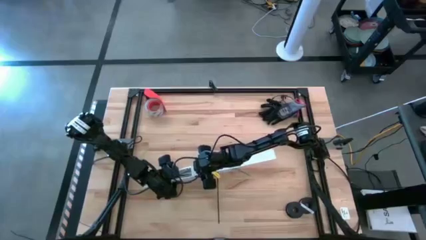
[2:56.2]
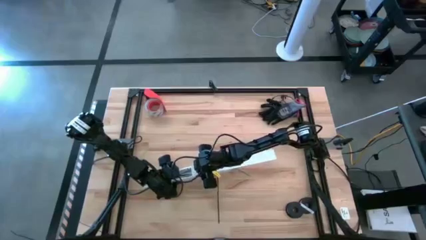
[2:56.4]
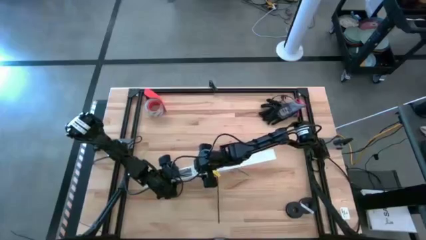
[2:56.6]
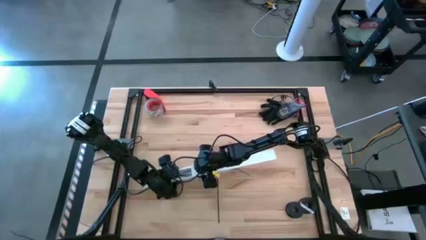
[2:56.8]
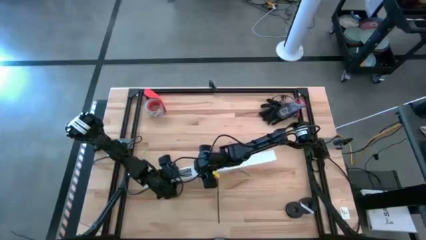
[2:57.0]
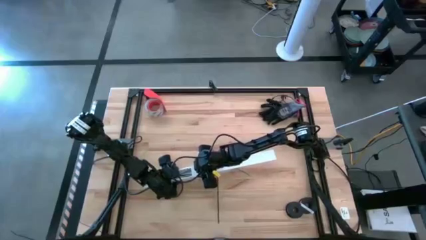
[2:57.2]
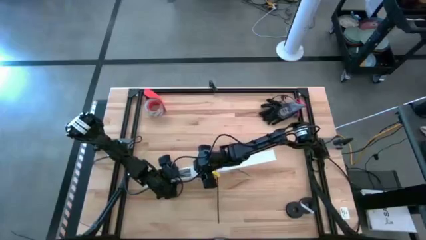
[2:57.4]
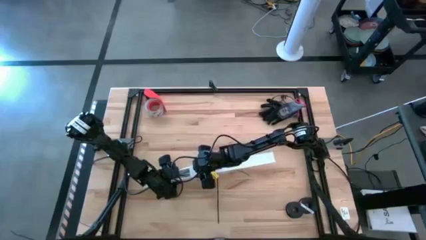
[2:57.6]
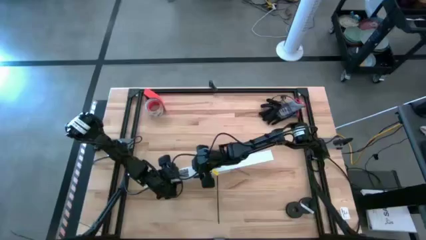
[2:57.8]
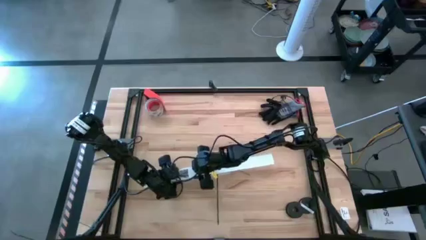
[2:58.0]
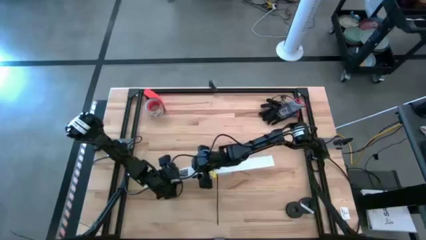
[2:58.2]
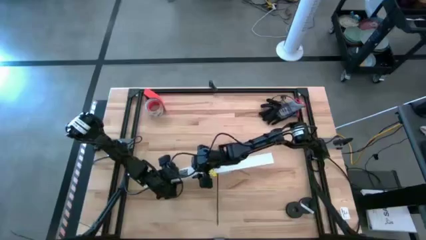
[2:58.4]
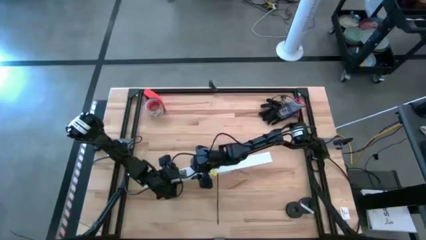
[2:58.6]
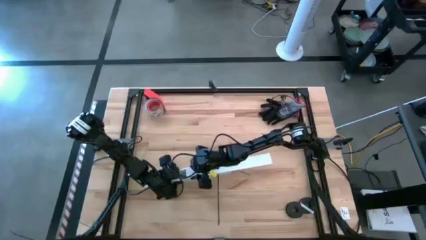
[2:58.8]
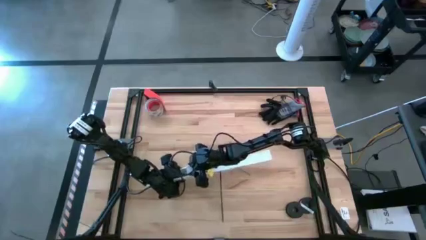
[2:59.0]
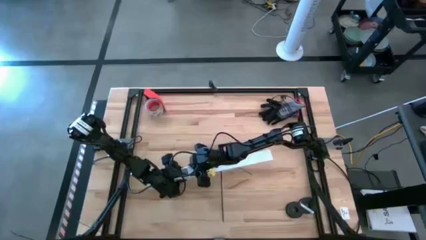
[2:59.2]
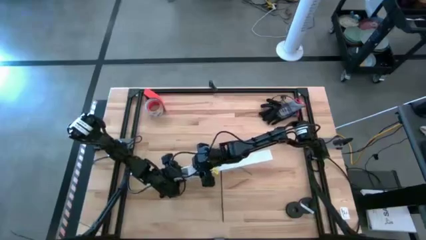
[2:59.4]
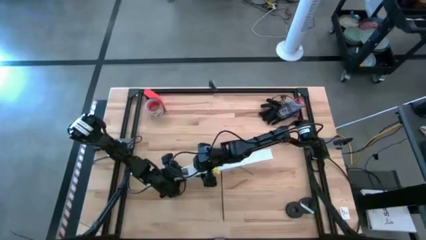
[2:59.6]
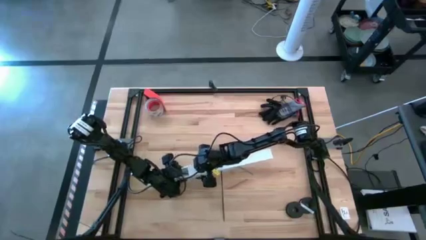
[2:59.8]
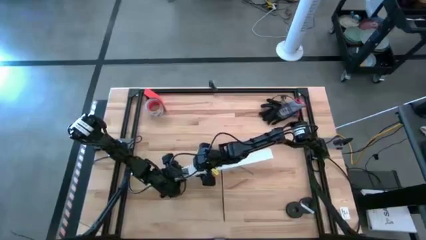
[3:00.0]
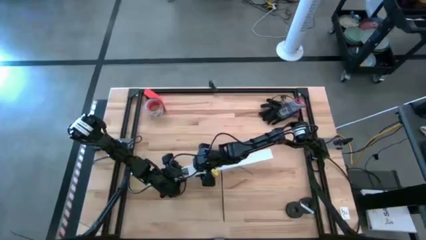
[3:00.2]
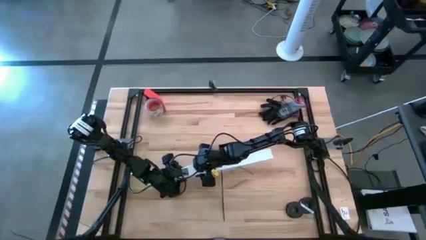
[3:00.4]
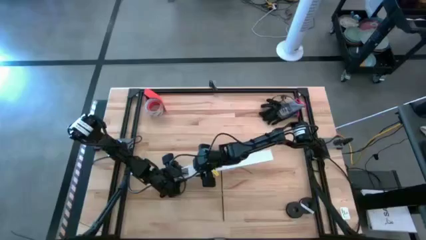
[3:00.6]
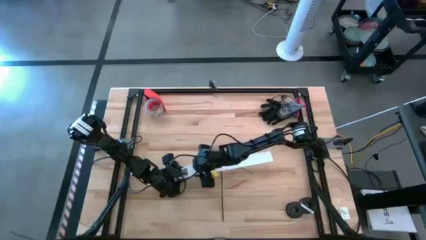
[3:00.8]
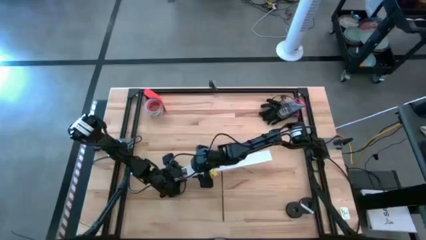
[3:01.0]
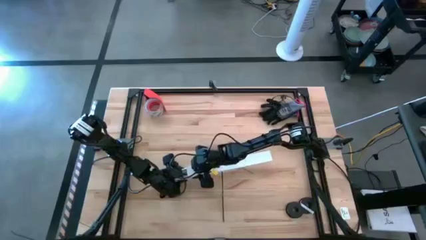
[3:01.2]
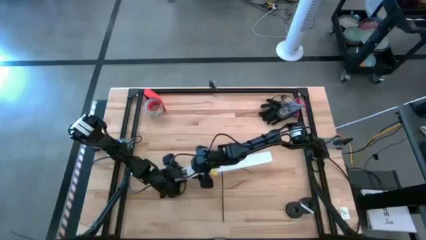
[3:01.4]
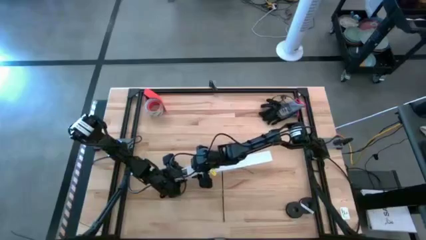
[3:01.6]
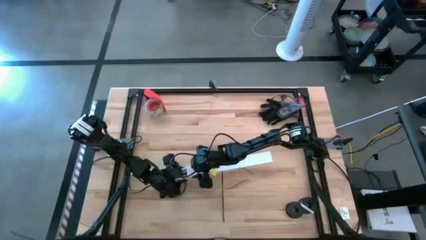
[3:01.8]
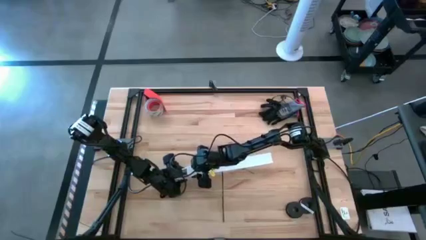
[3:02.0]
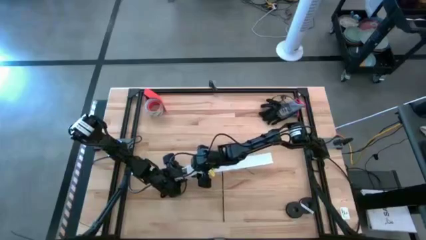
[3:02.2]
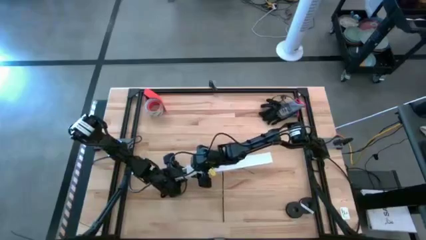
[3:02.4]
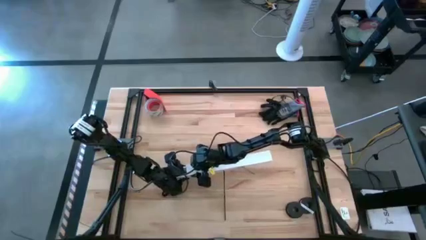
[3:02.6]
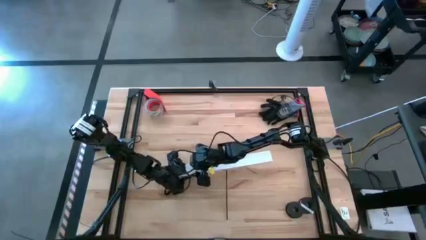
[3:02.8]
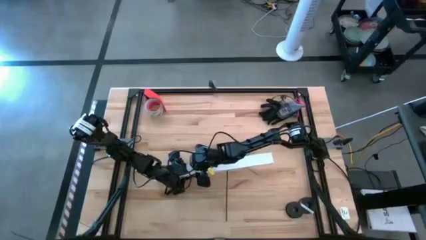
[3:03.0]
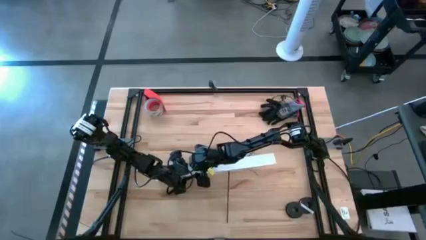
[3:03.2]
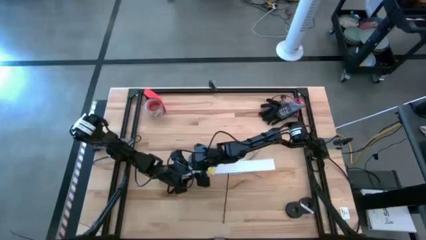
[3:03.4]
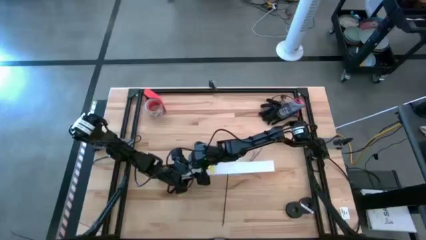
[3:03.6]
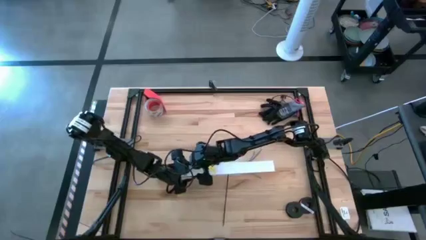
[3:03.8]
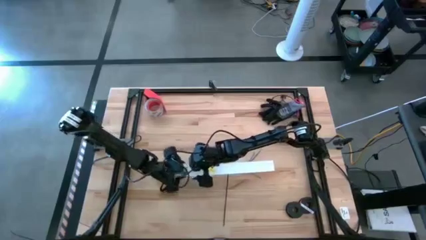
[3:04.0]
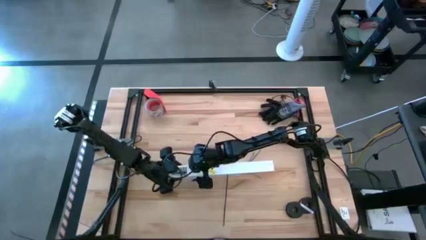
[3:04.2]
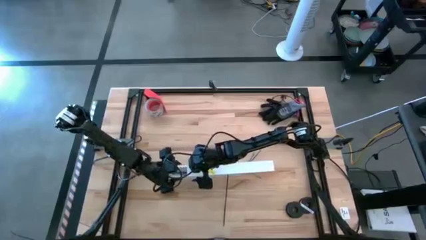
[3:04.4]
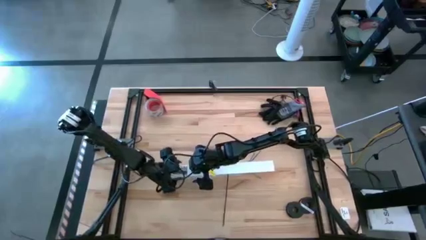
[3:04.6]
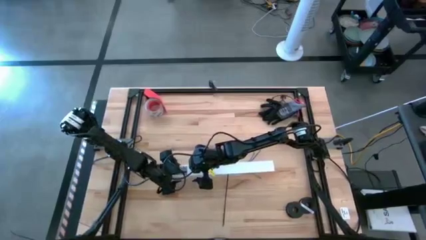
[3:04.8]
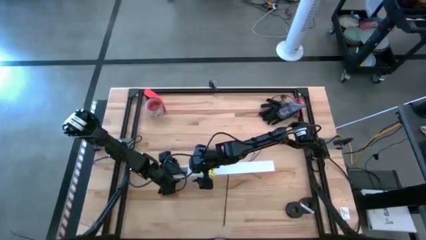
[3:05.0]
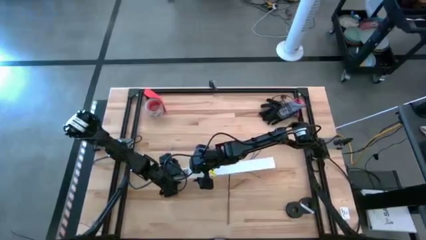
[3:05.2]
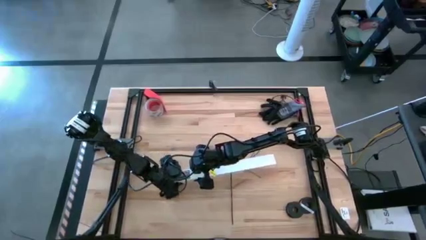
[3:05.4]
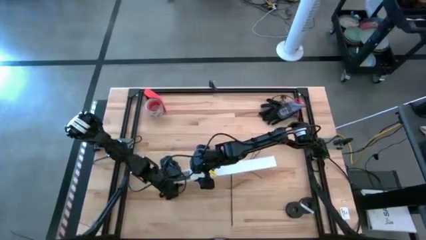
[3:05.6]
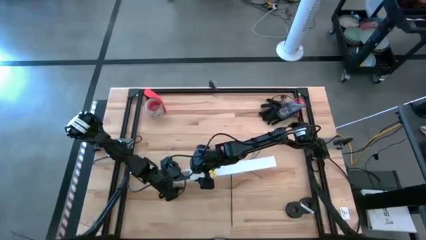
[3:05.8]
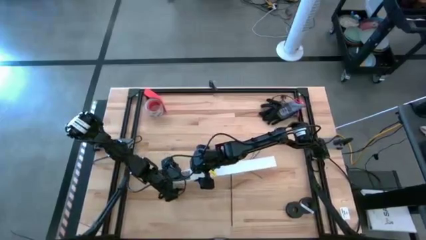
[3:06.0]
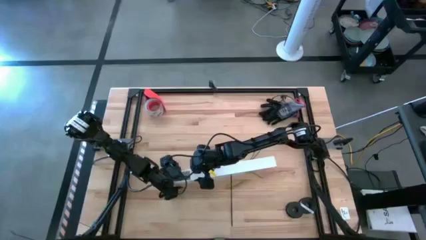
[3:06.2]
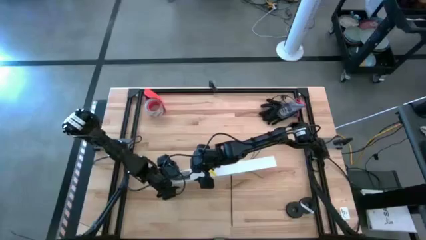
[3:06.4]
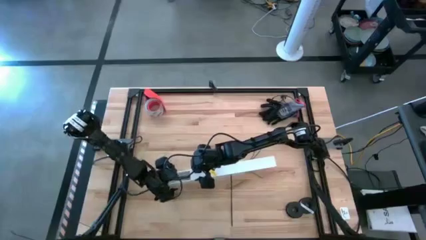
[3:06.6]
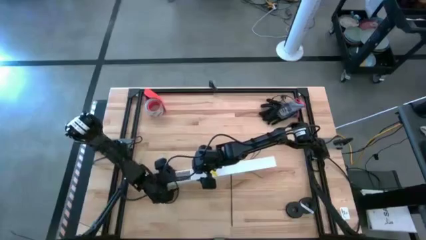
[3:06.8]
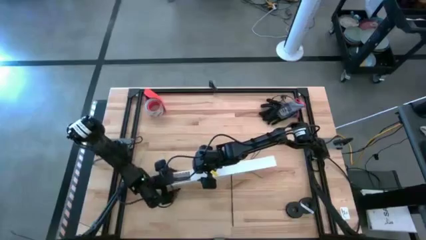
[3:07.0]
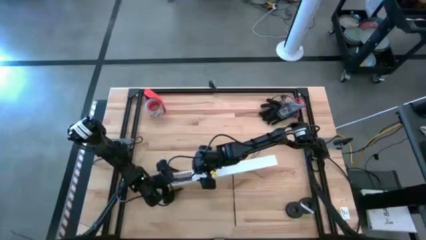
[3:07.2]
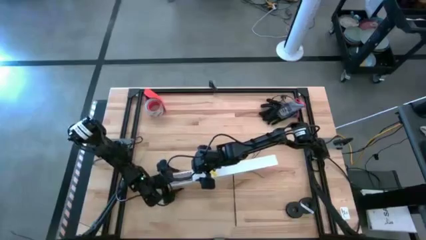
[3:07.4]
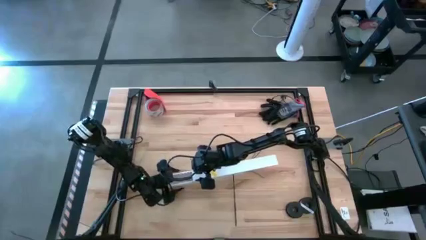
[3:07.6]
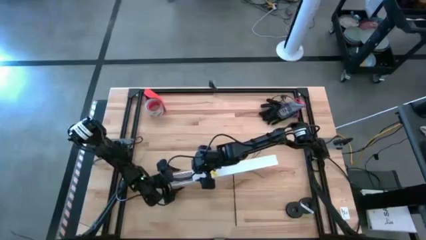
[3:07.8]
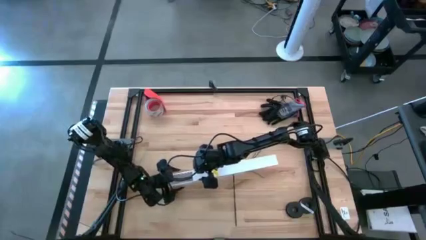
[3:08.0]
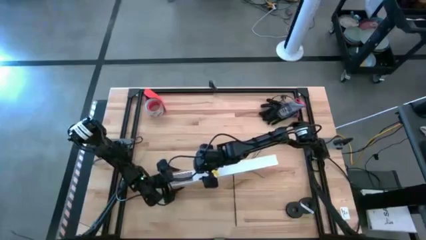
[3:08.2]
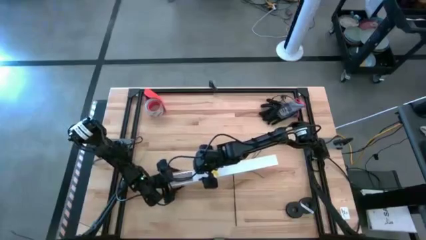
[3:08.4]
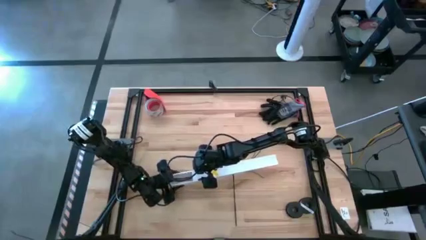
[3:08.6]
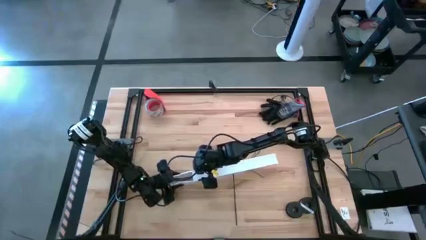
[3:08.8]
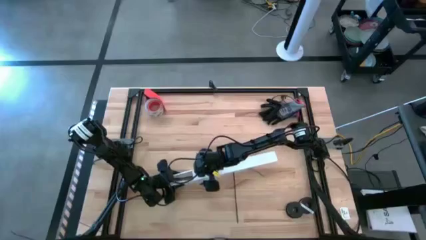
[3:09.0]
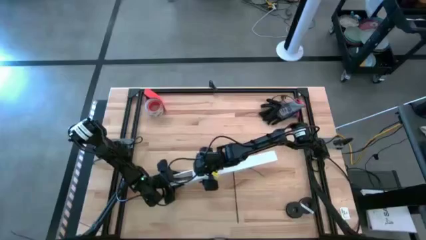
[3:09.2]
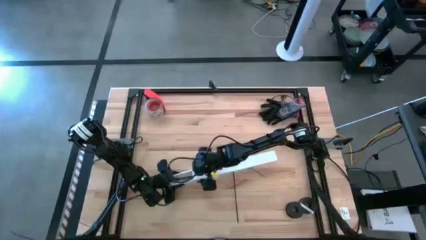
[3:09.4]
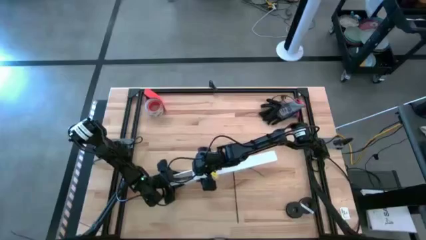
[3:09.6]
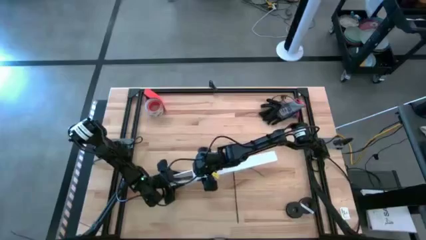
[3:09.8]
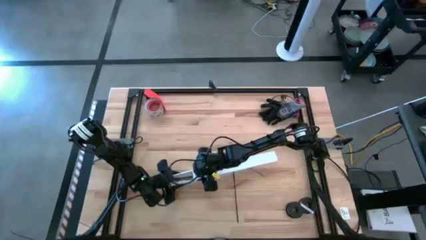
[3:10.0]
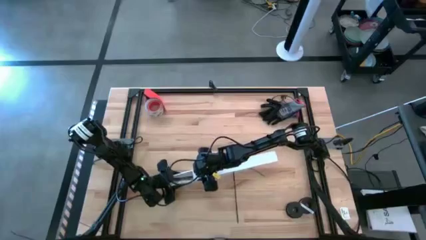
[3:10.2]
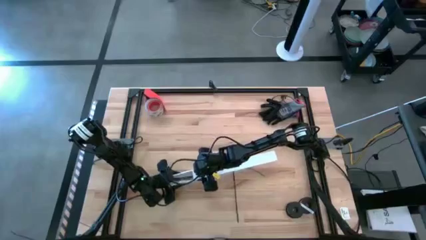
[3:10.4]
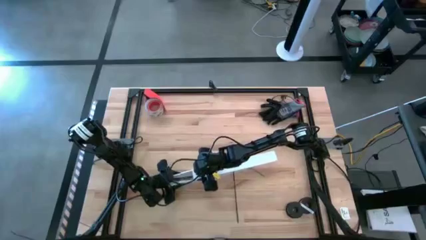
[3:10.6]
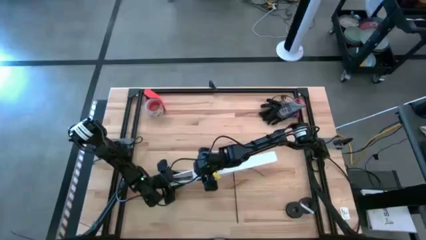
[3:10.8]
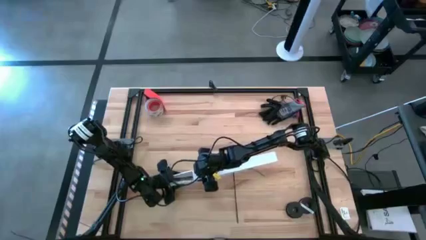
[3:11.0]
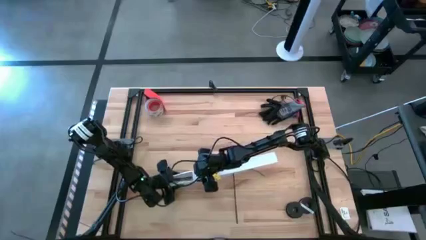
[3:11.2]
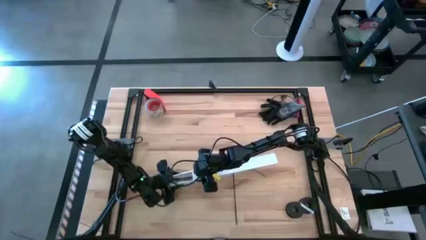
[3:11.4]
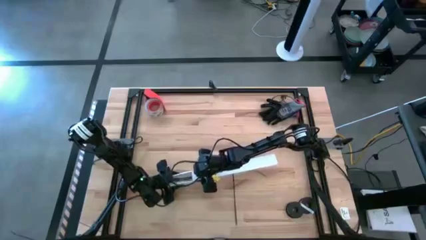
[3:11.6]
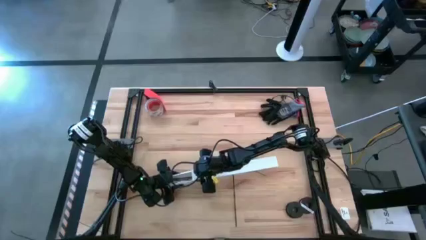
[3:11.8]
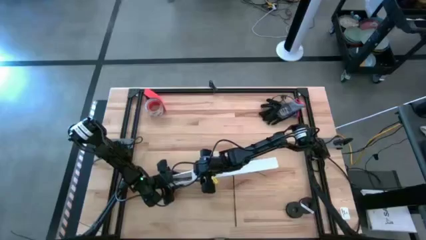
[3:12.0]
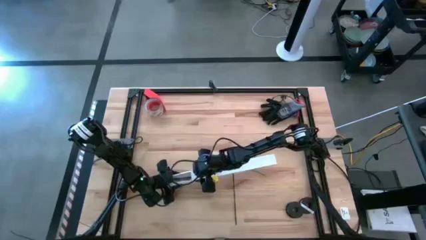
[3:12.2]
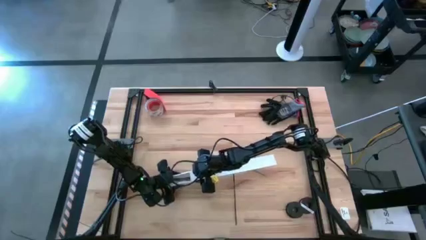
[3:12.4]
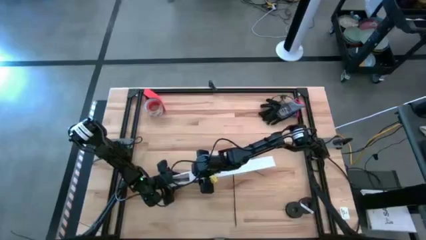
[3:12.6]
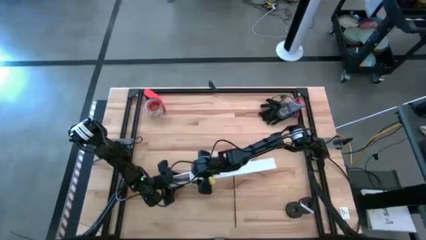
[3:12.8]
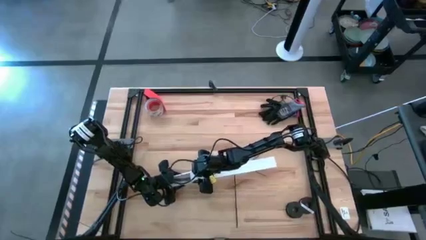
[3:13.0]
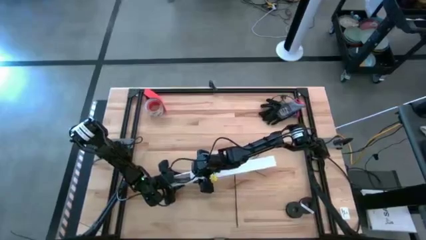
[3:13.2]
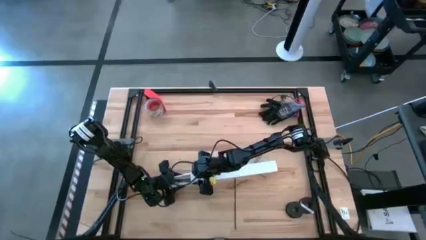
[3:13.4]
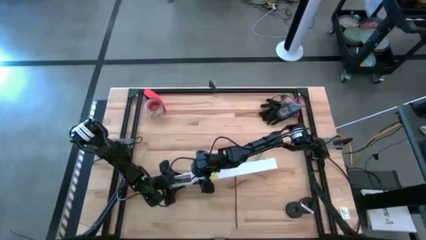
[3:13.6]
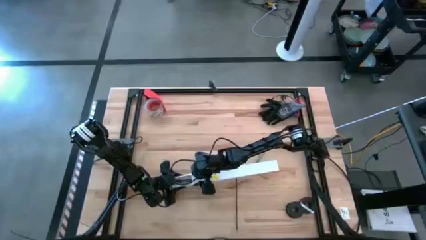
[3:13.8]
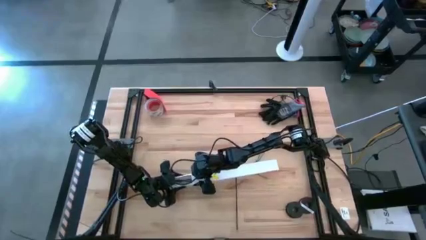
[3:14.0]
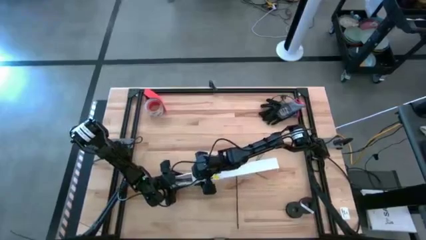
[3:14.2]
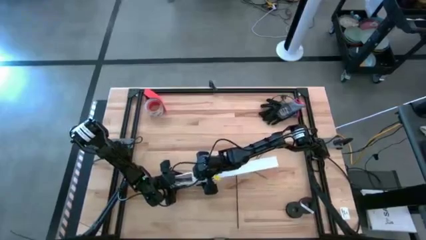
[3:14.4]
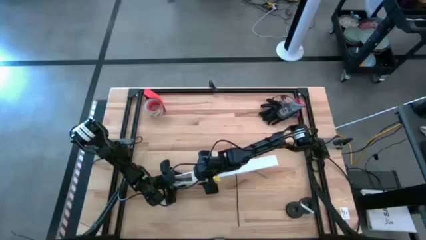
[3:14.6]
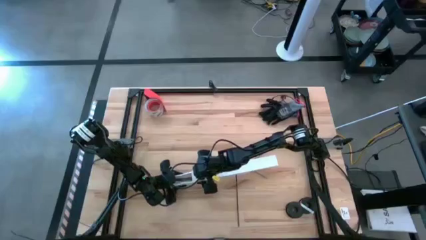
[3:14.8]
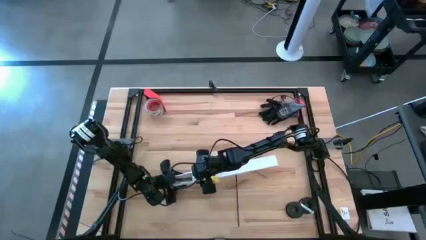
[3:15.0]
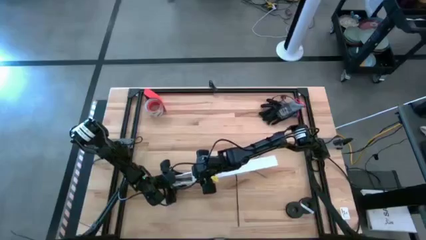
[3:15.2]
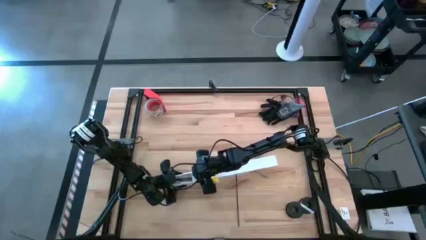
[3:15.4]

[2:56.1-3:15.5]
Task: Ziptie cables
Close the cable duct
